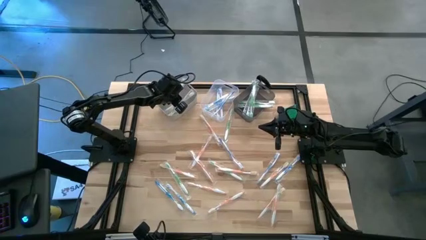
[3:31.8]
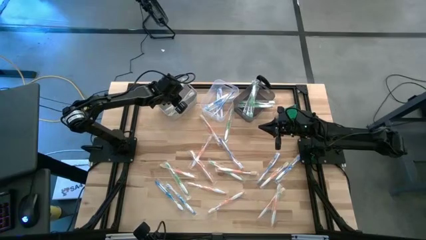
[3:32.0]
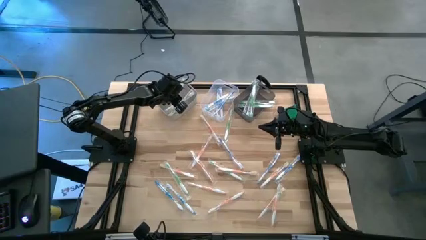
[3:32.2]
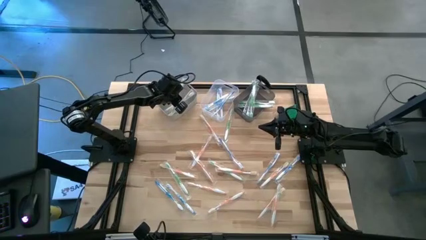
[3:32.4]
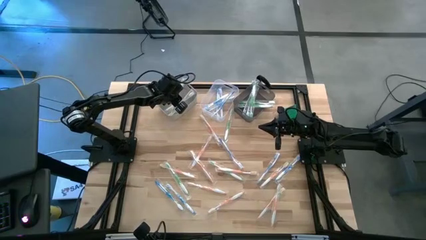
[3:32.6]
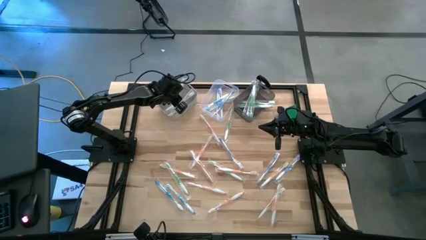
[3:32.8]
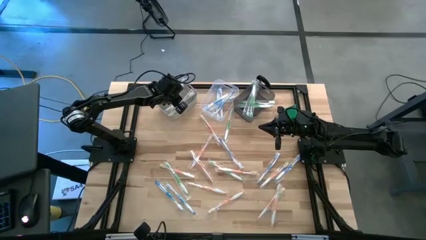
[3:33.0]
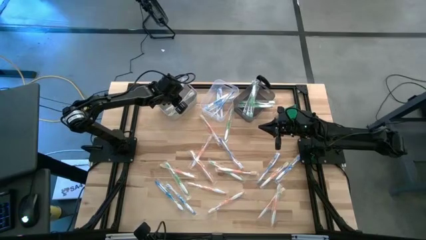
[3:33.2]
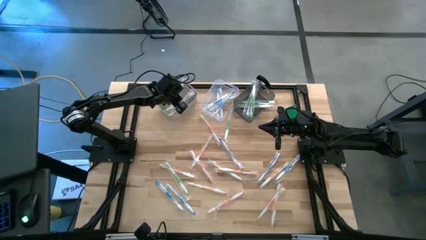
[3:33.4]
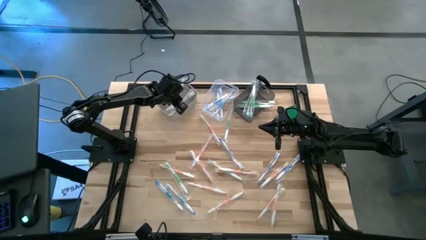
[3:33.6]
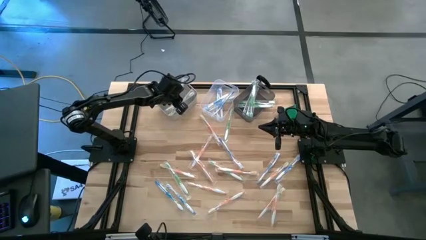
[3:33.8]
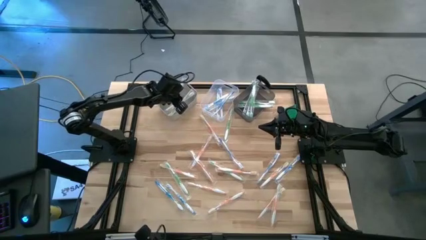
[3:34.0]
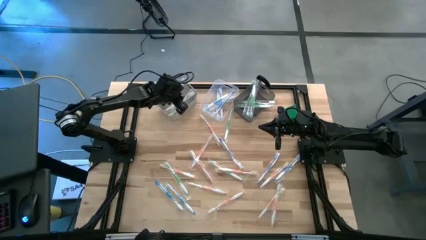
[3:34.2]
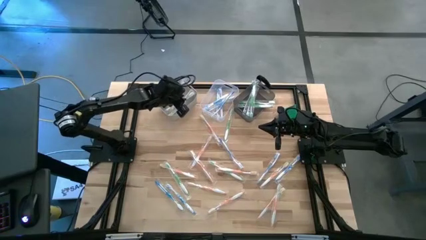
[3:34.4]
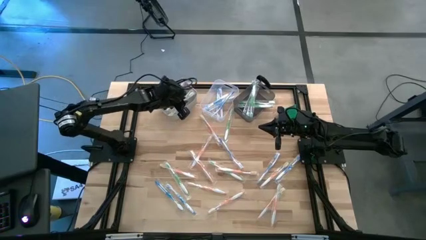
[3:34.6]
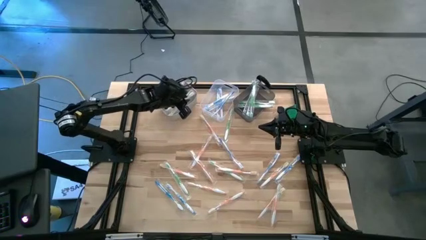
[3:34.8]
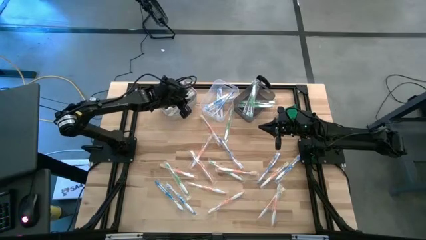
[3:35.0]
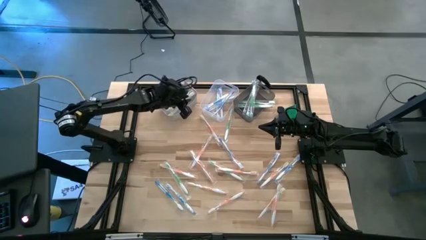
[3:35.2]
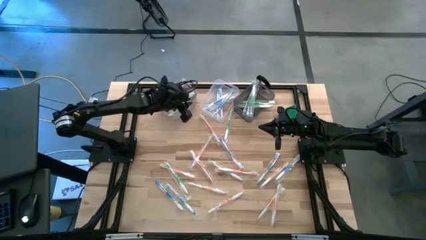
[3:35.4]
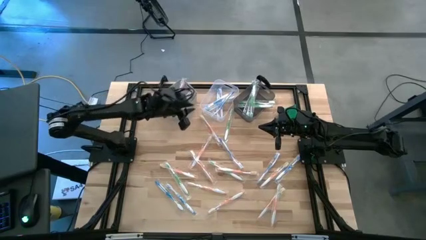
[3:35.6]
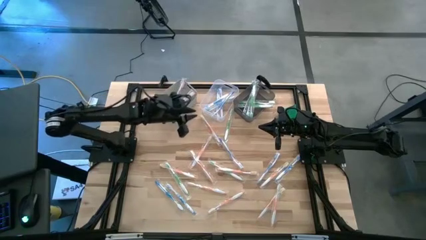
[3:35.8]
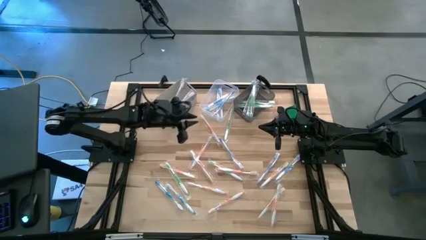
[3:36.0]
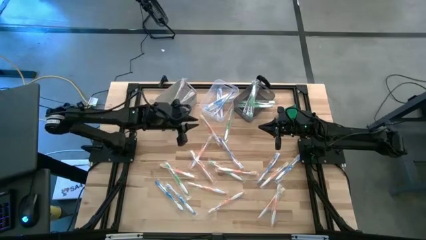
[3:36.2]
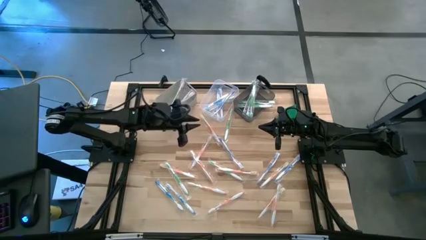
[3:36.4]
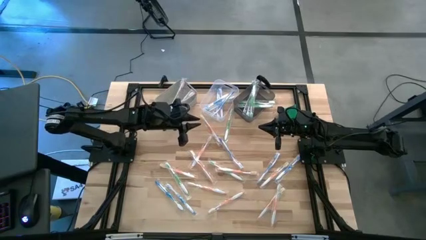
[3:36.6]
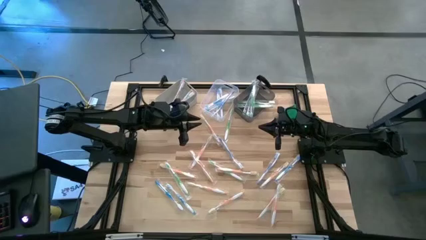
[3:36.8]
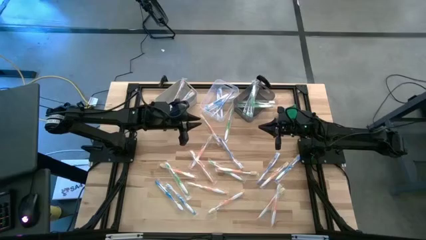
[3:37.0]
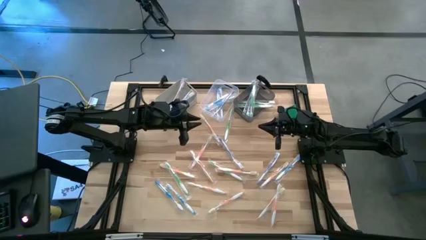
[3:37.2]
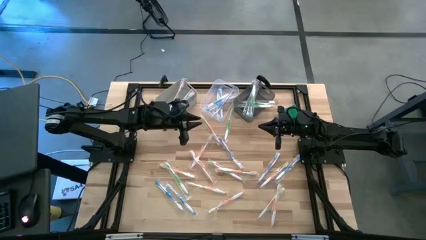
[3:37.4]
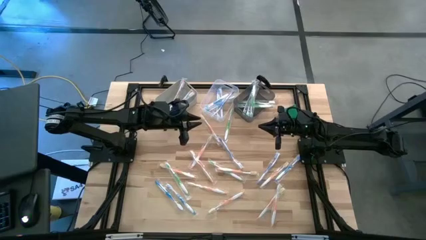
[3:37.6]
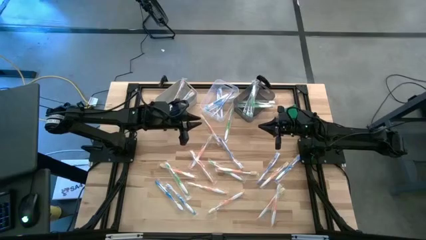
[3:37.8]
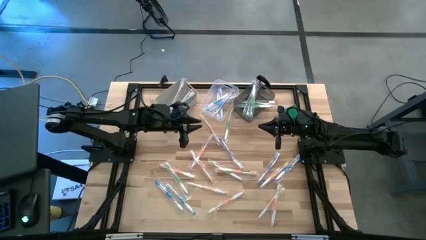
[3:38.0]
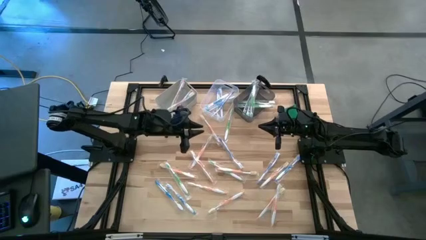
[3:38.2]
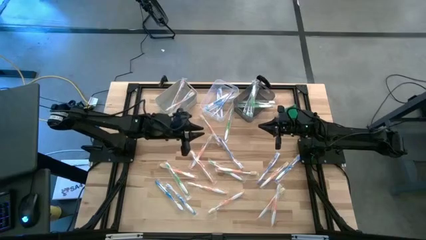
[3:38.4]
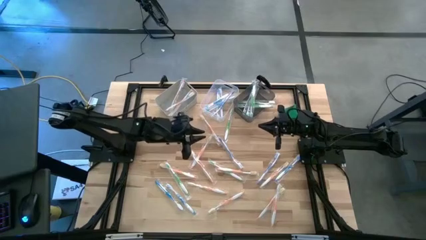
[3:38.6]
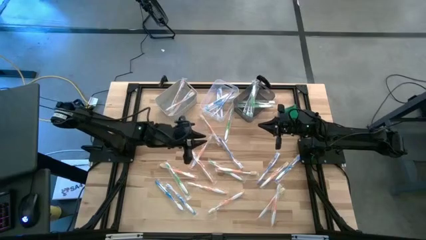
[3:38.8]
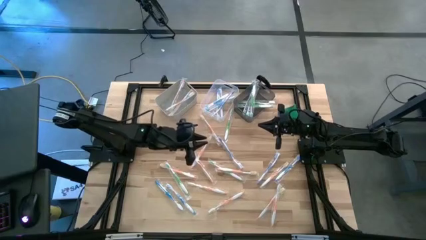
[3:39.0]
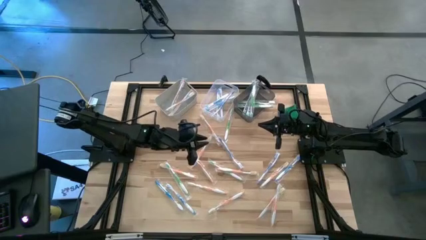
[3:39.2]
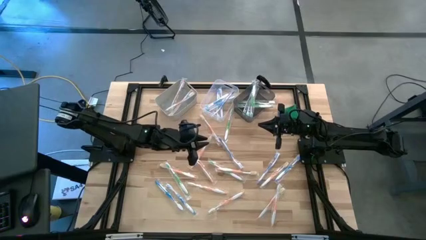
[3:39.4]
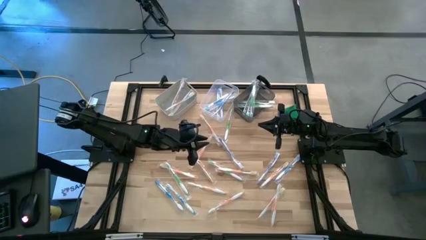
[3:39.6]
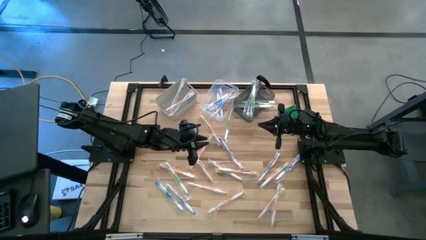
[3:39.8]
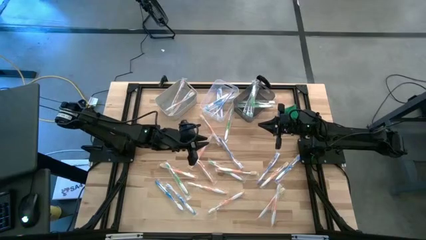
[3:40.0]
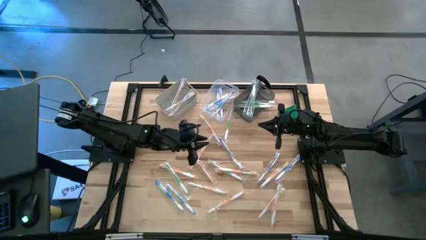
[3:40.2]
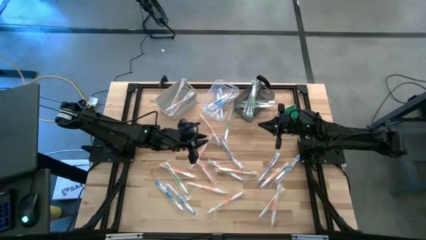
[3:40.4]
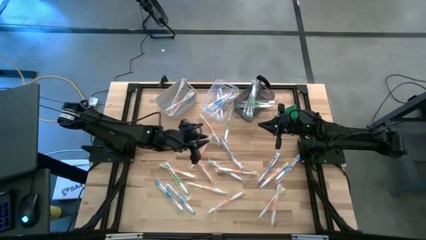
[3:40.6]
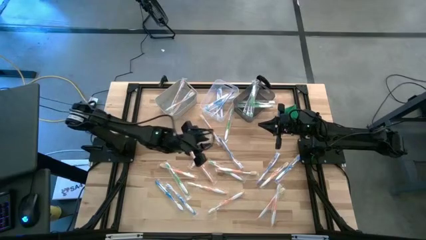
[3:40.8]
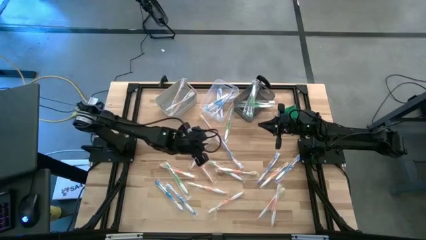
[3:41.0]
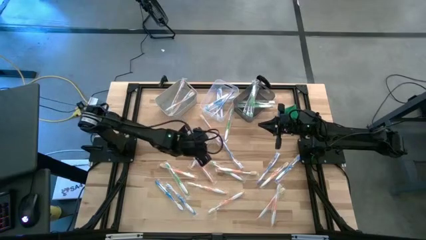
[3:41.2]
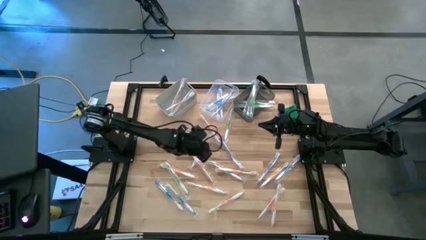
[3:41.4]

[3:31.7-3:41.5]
Task: Pick & Place Toothbrushes
Put the orange toothbrush into the white bin

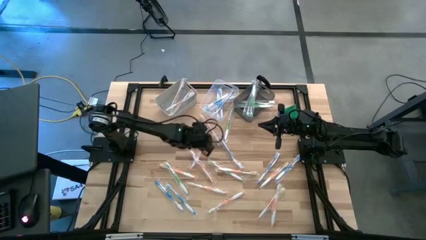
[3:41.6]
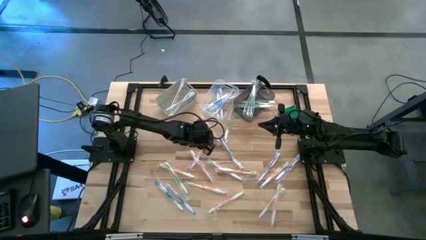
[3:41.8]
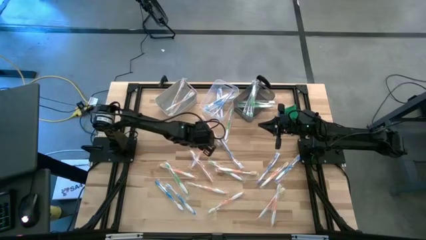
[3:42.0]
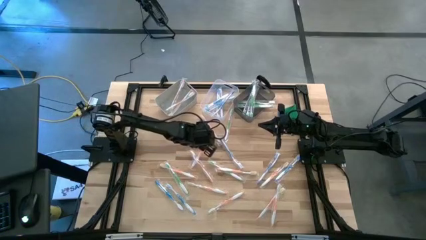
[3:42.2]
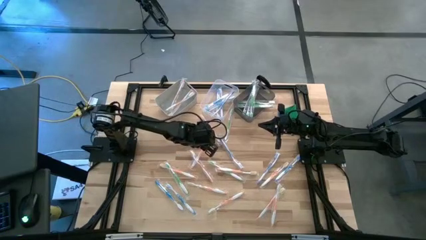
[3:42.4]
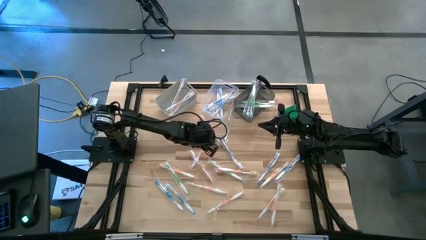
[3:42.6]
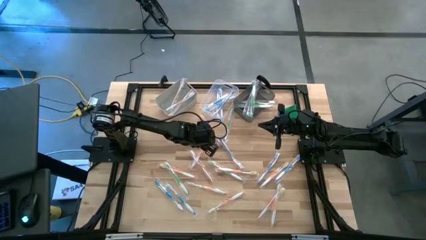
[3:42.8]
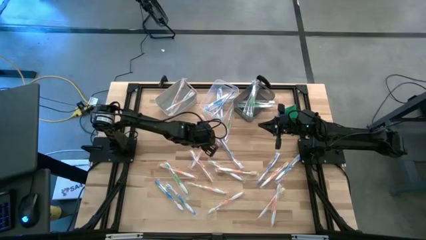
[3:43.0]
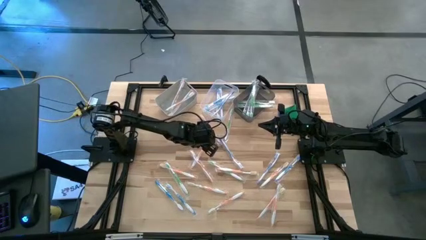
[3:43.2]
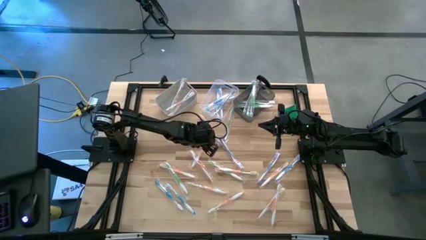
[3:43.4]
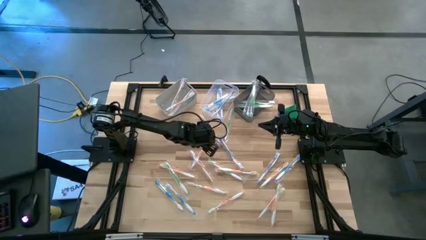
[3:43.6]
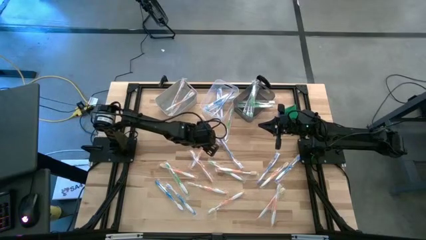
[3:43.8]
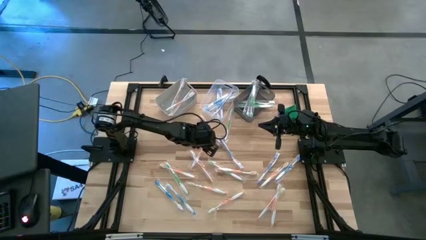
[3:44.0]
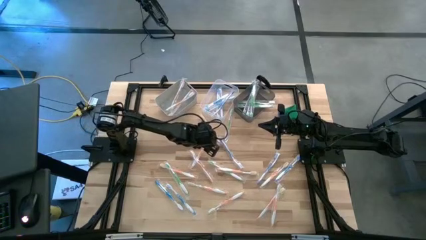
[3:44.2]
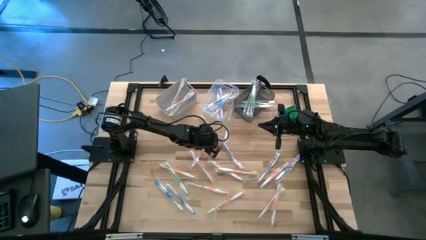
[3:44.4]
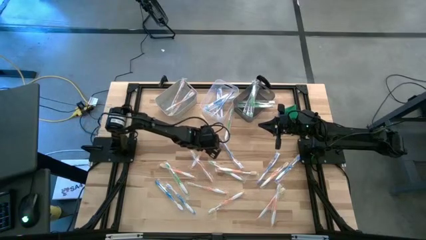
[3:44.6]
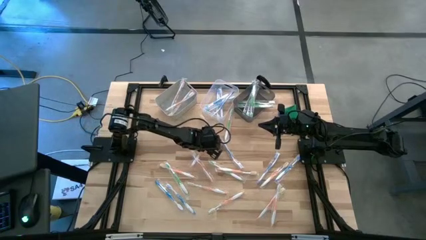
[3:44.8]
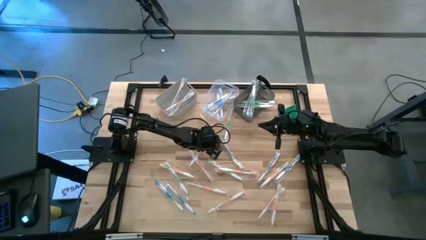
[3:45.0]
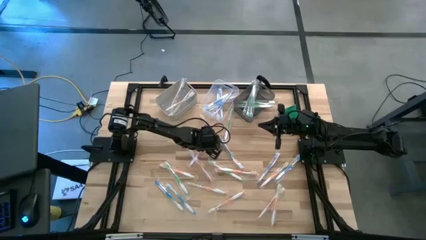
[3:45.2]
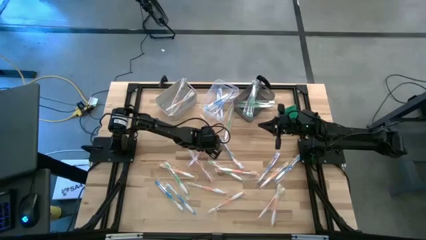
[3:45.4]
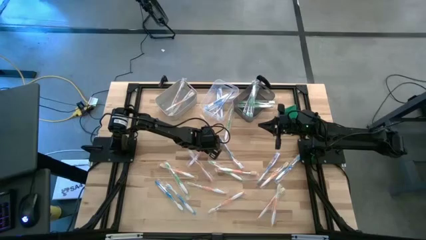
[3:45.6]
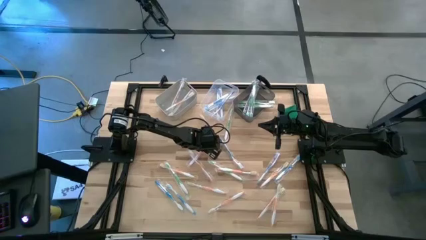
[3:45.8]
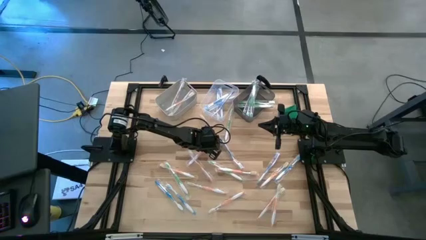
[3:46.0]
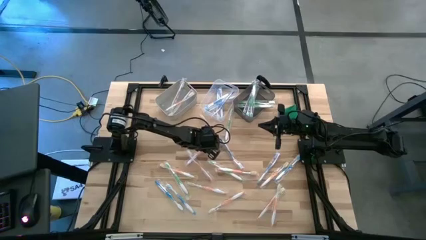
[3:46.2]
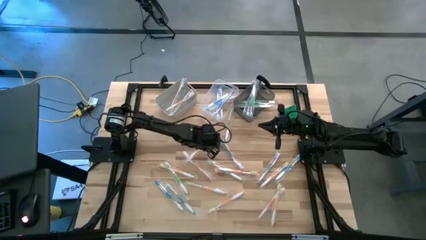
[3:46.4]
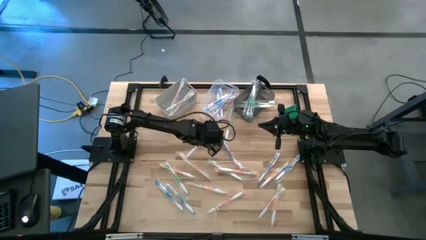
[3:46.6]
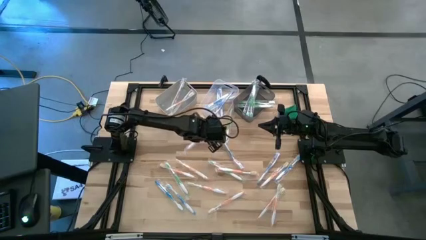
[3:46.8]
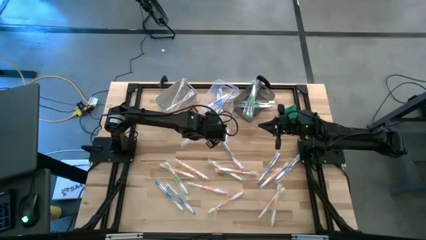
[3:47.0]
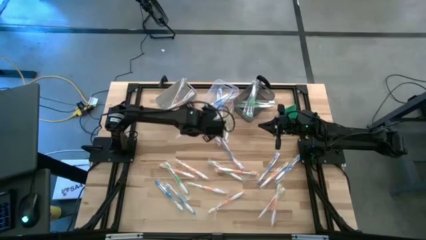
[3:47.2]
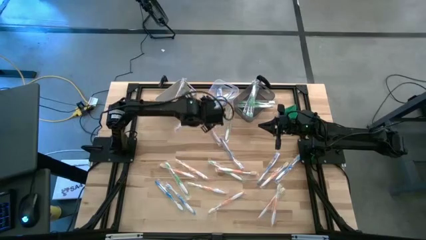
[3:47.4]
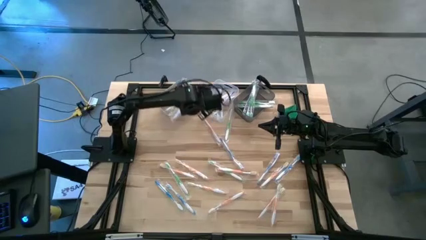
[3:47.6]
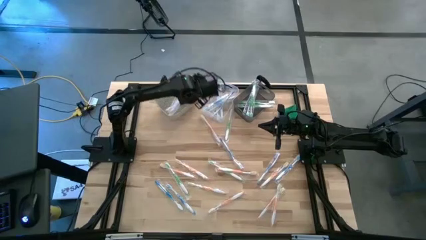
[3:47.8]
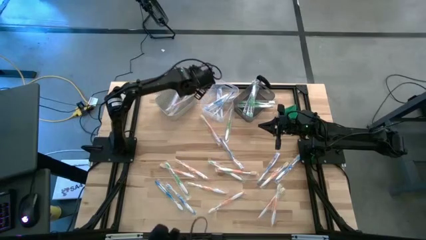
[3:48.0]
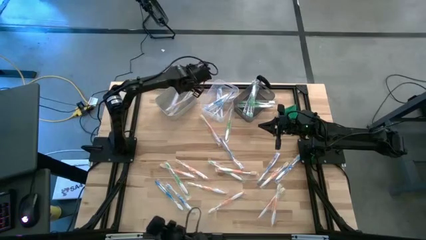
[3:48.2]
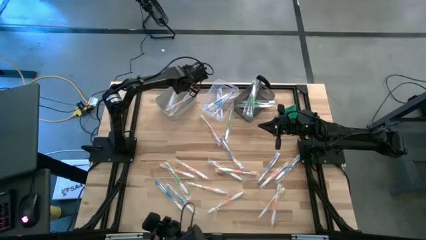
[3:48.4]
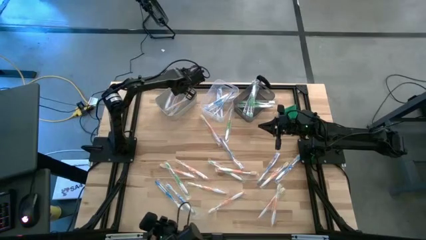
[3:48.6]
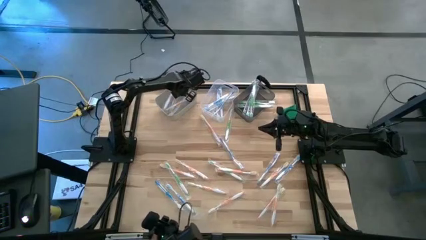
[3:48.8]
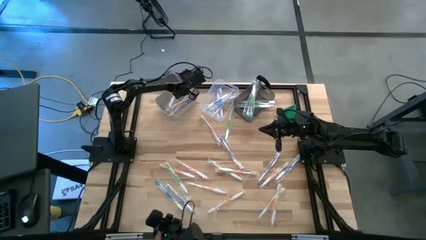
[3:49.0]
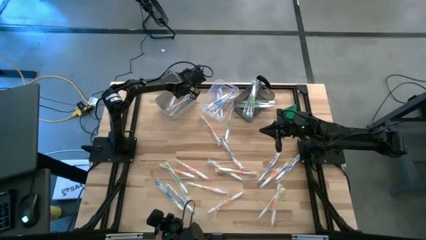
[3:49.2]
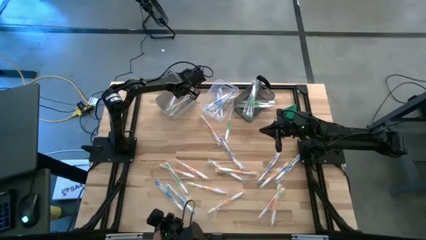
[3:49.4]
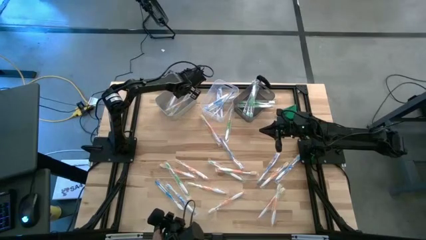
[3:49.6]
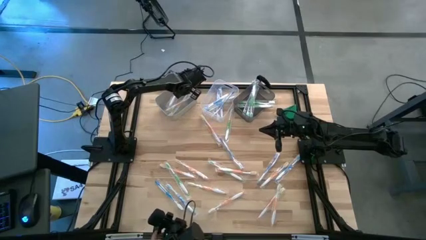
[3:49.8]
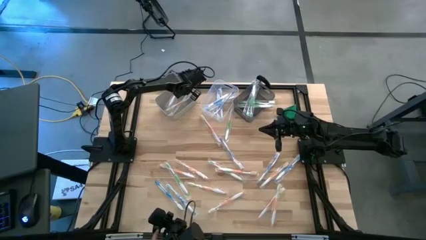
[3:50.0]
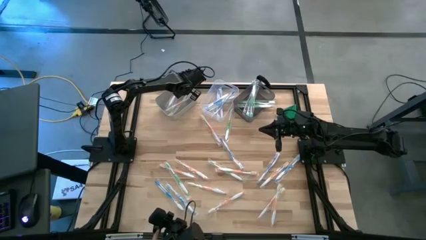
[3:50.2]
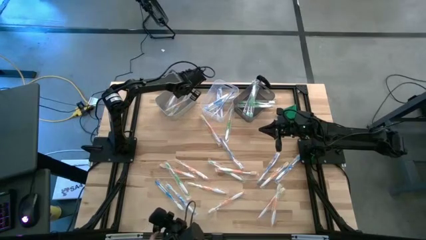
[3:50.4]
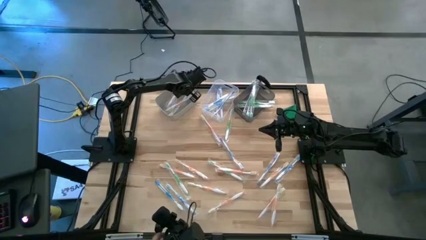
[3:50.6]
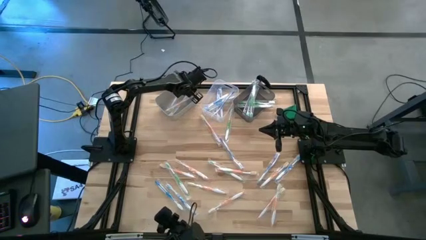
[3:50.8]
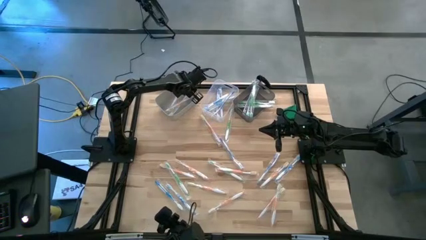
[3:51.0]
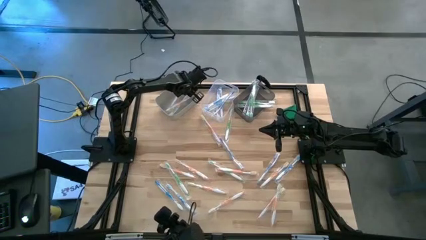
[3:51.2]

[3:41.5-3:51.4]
Put the orange toothbrush into the white bin
